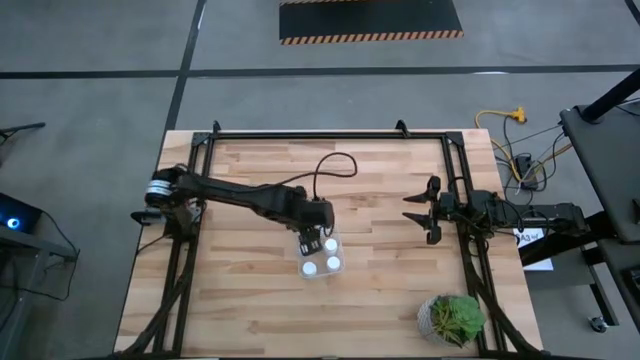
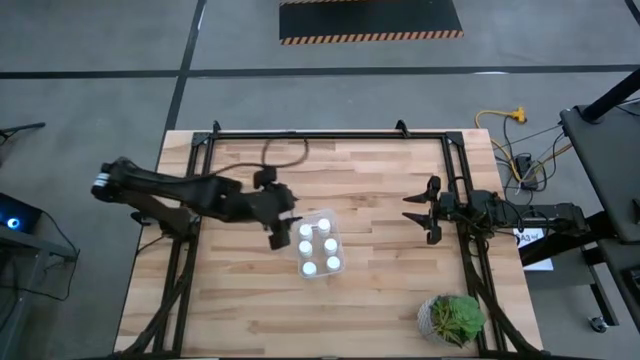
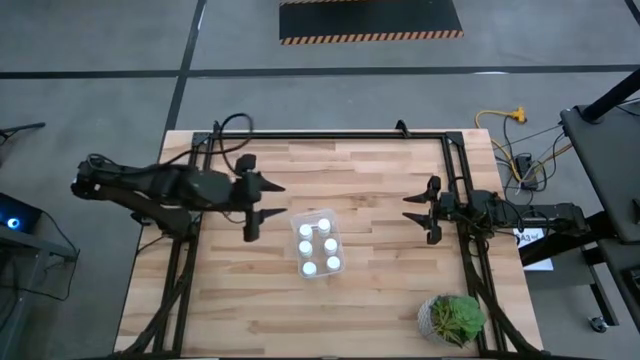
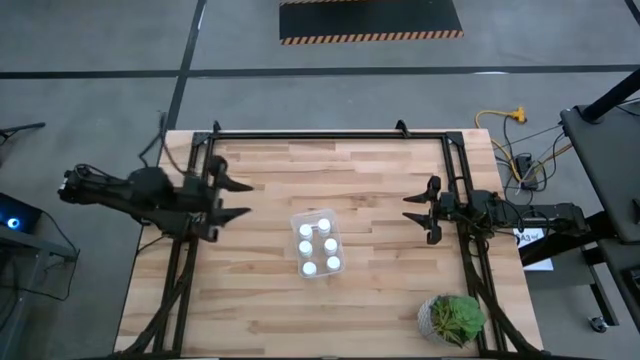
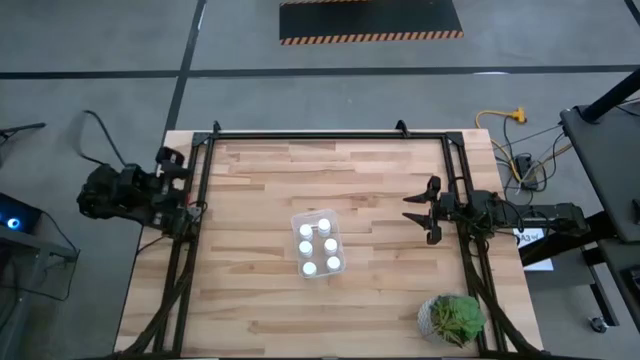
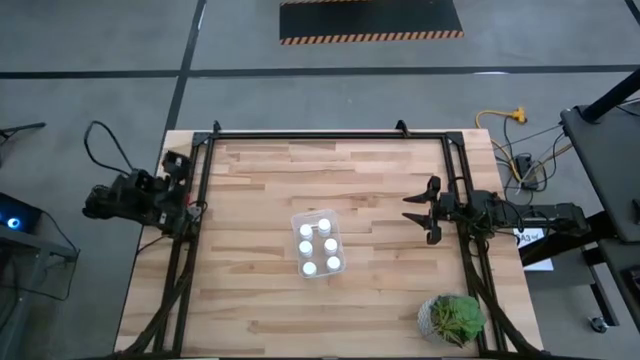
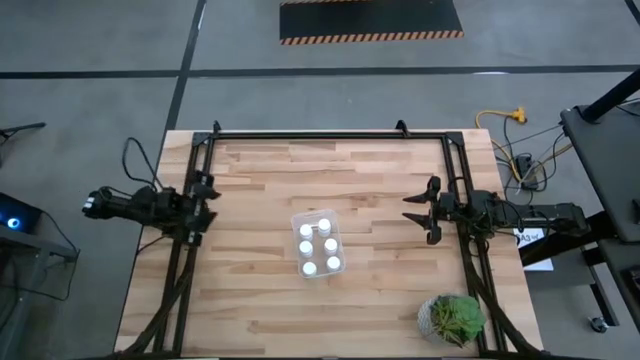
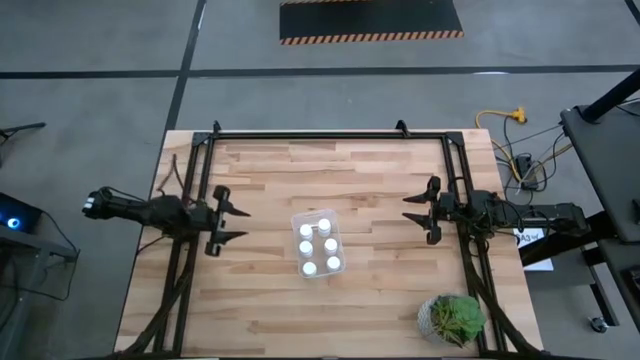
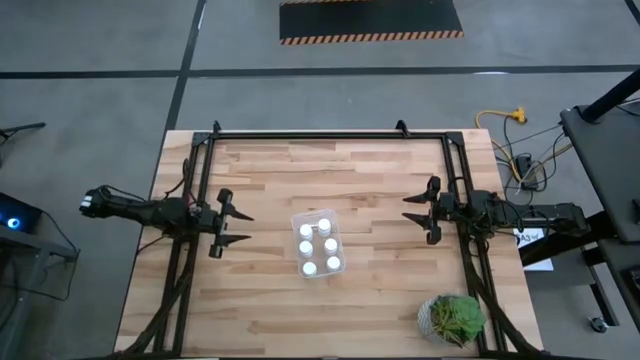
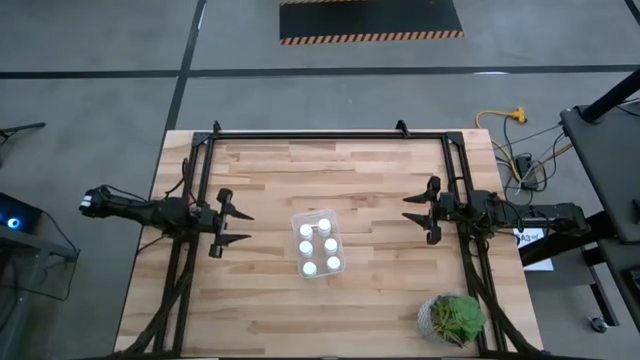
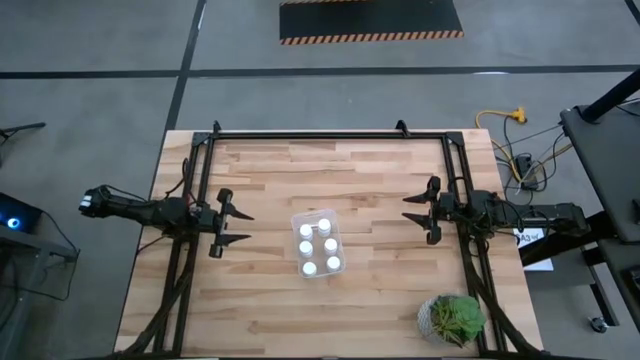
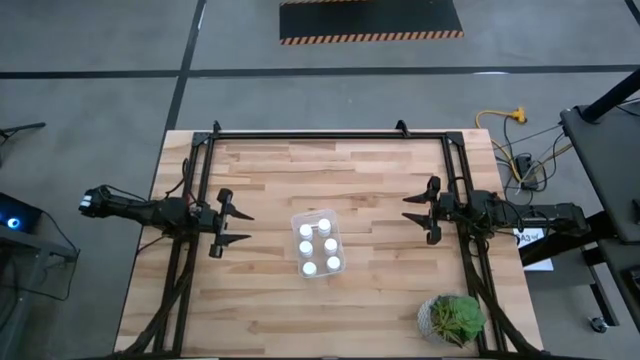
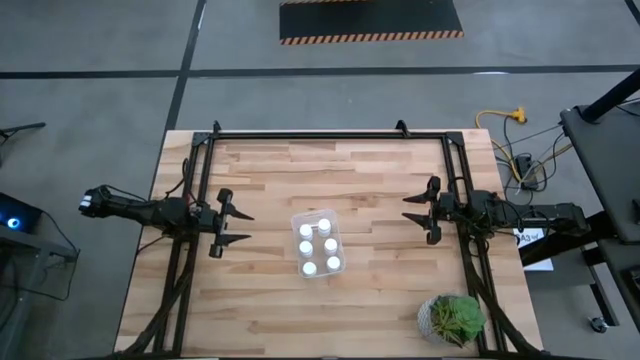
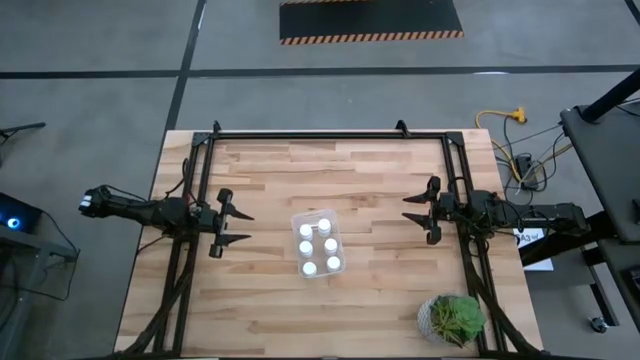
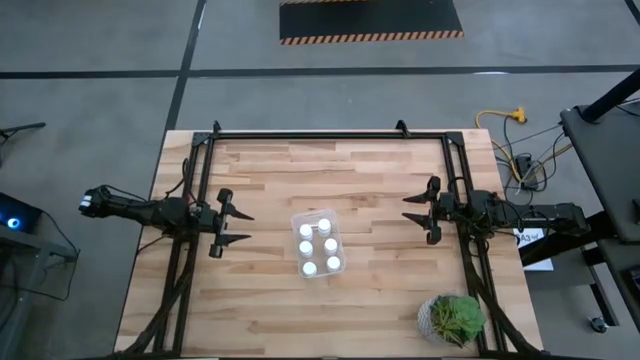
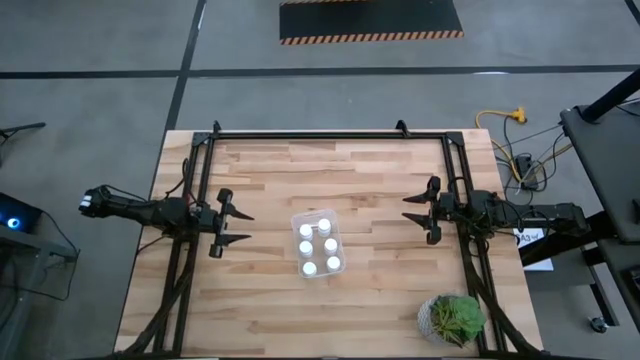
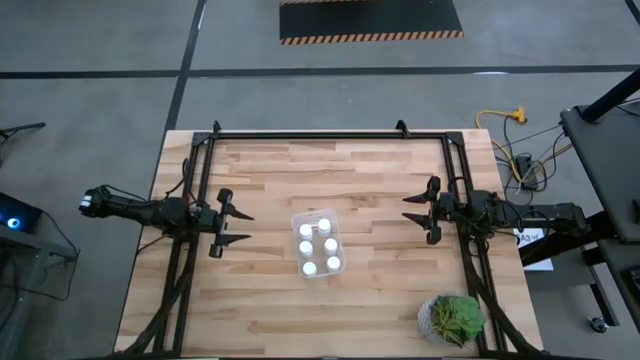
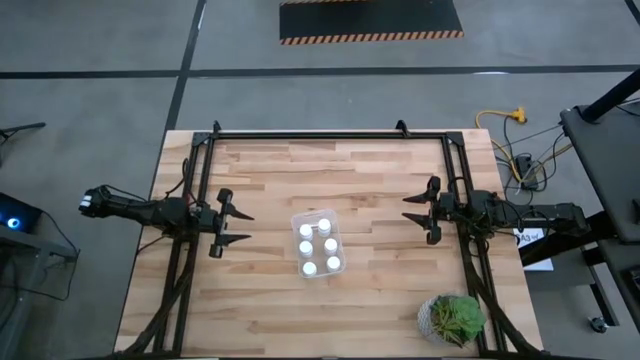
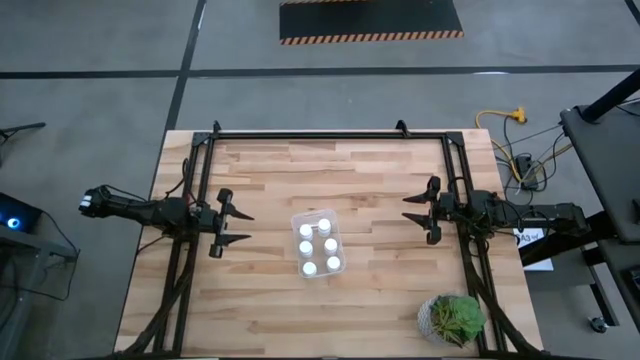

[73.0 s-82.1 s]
Task: Pick and place pill bottles into a basket
Return to Home Position

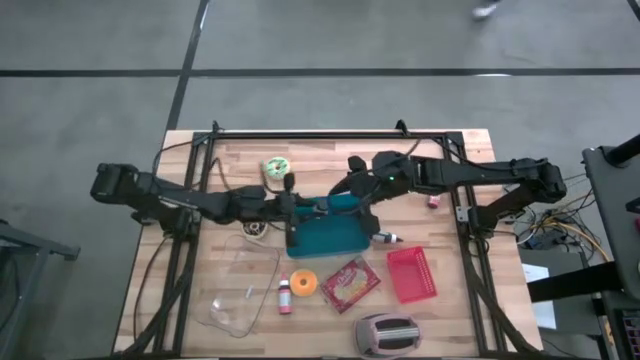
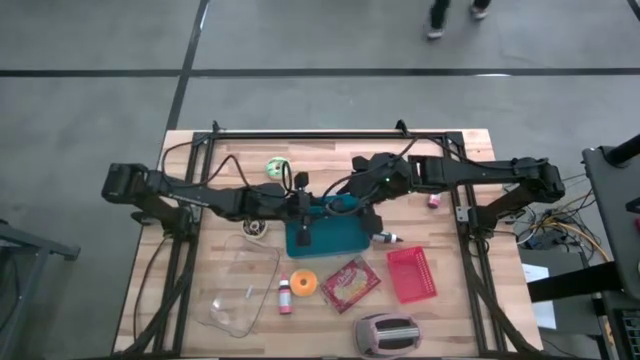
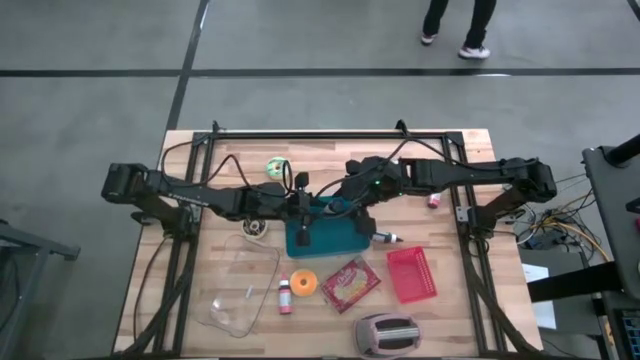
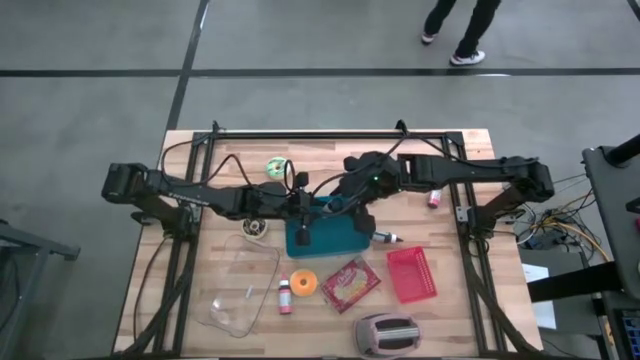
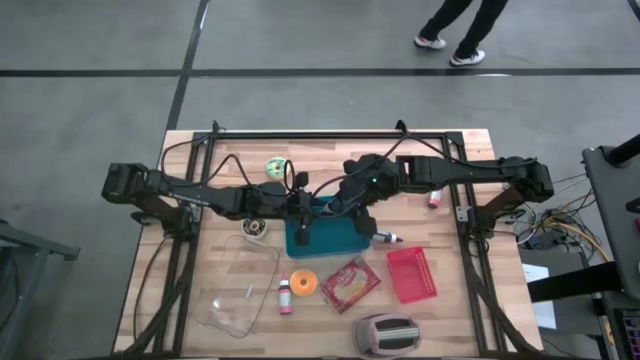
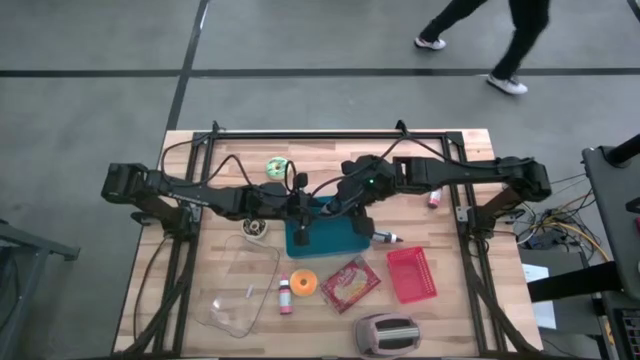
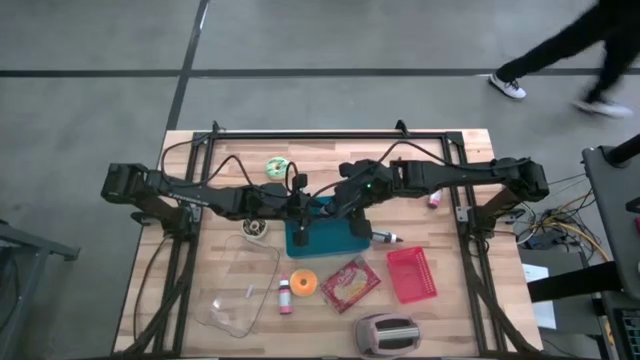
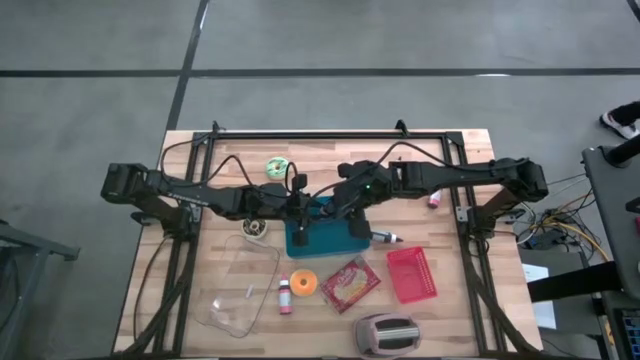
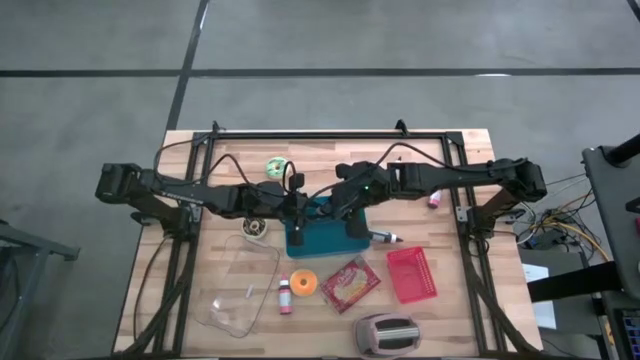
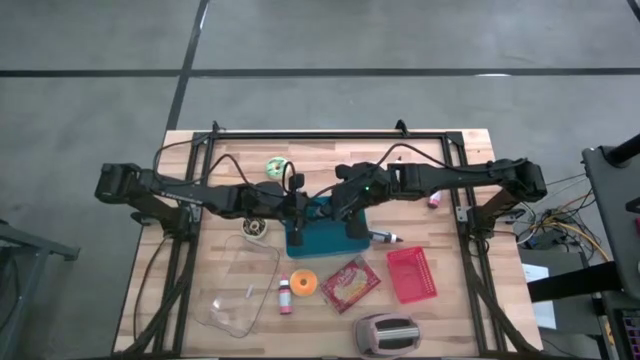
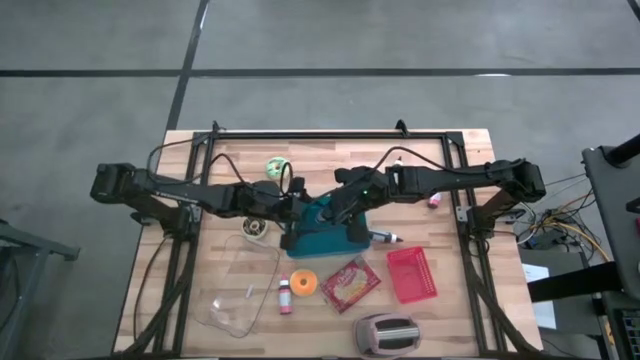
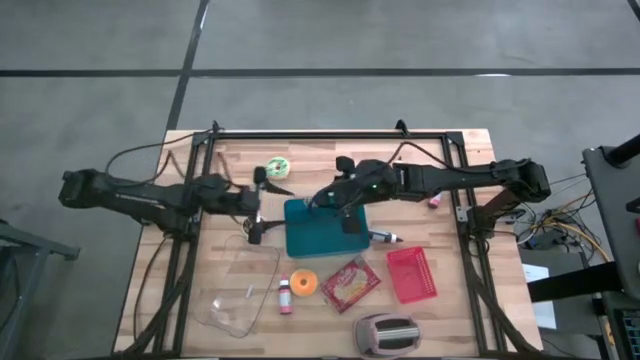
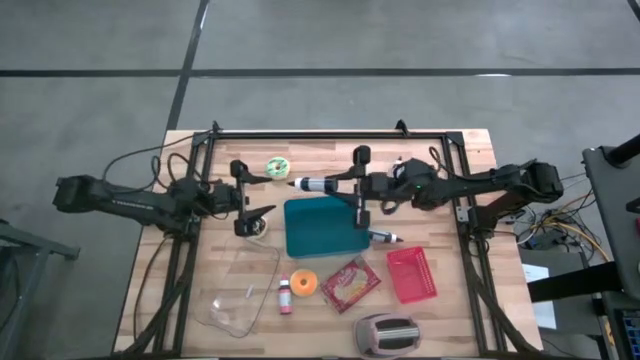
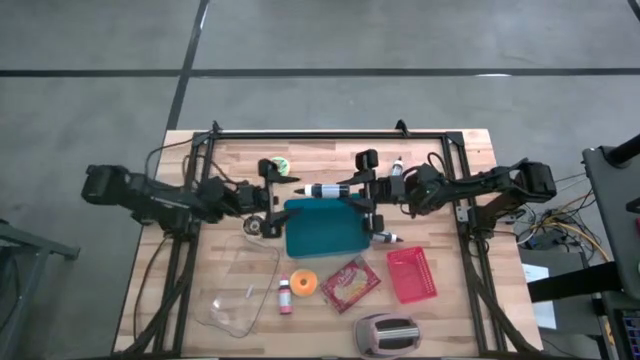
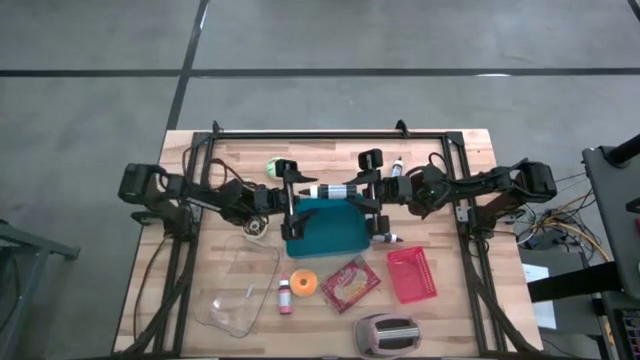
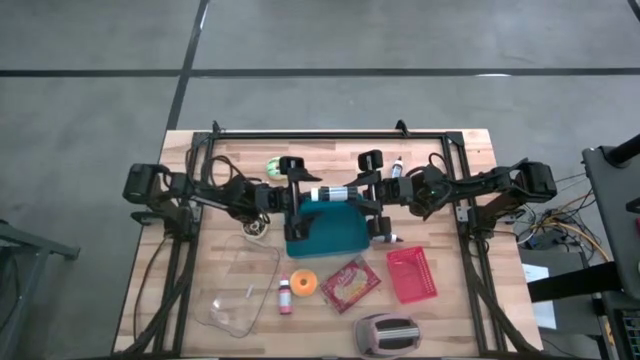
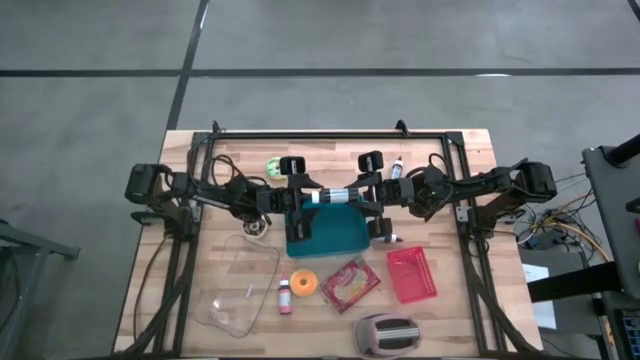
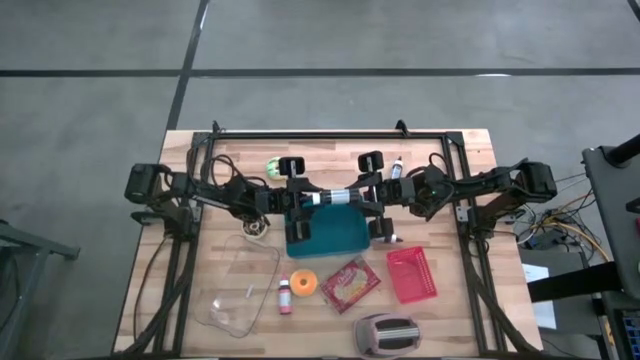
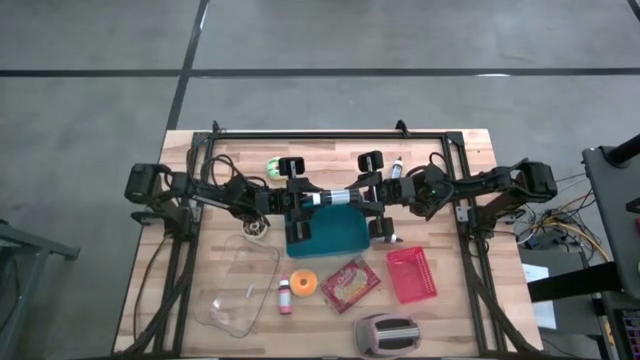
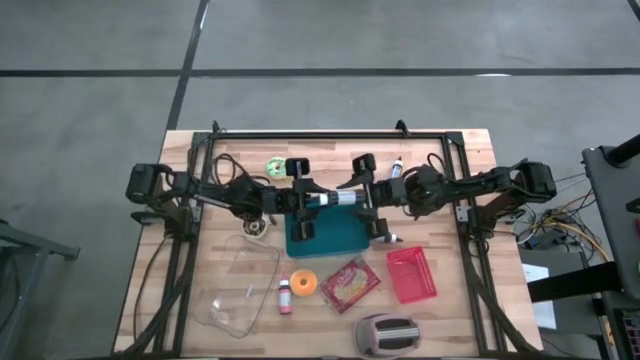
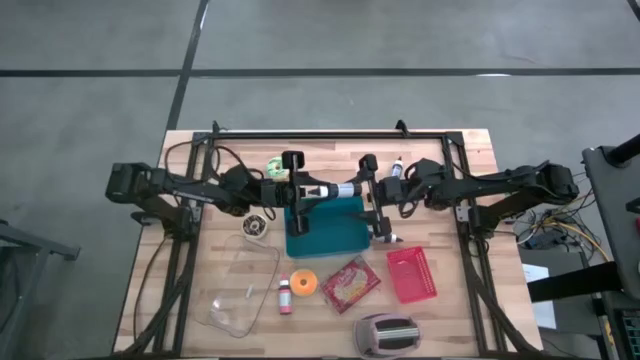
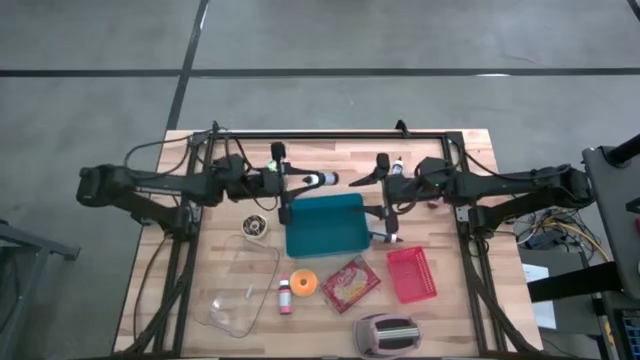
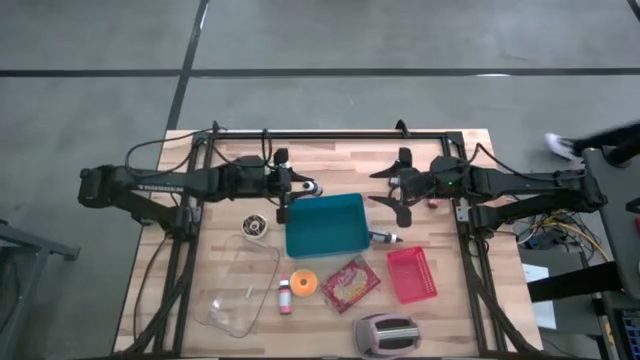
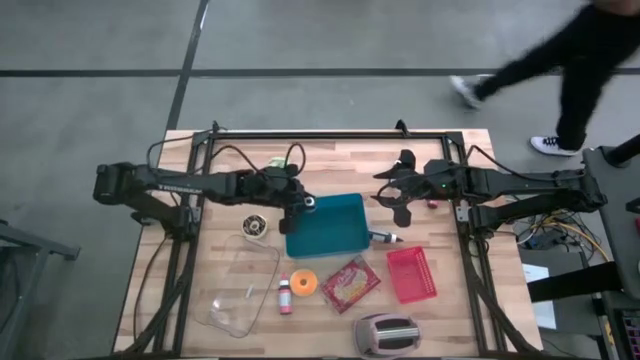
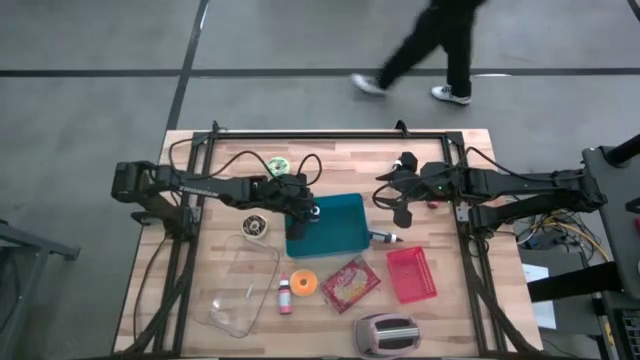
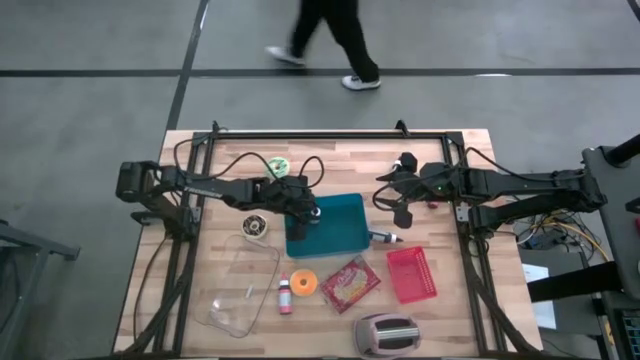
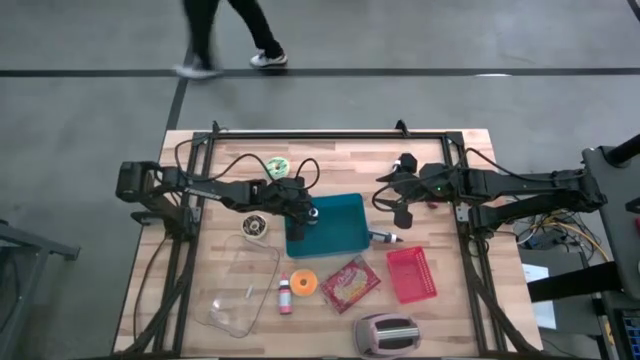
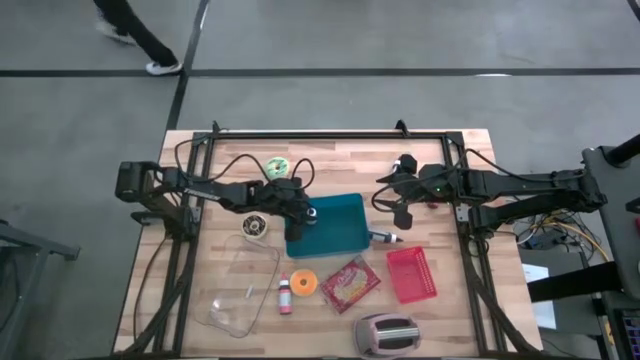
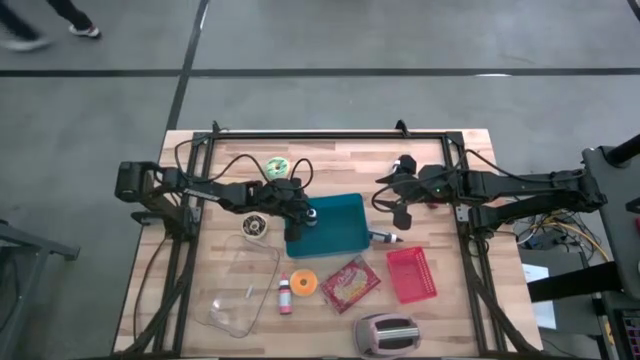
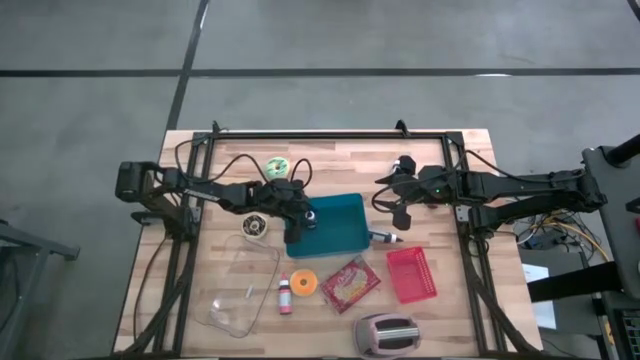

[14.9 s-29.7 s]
Task: Pick & Place Food Item
Put the top left black food coloring bottle into the blue bin
